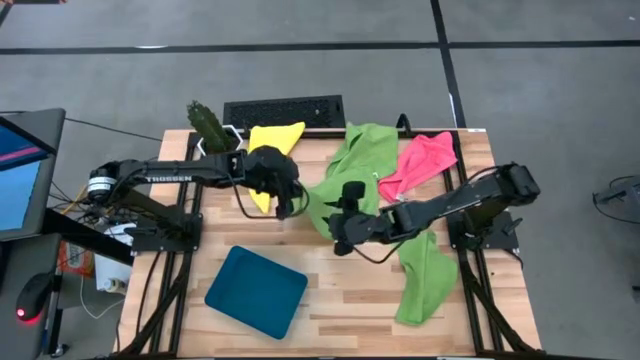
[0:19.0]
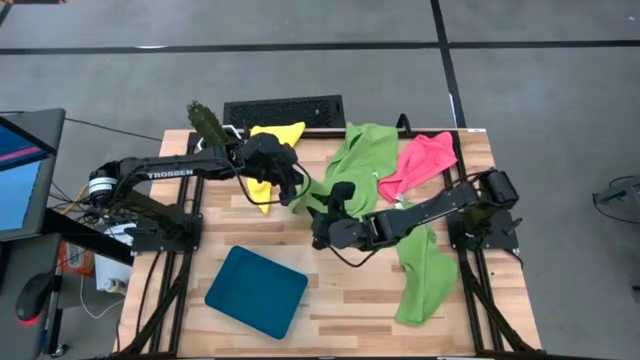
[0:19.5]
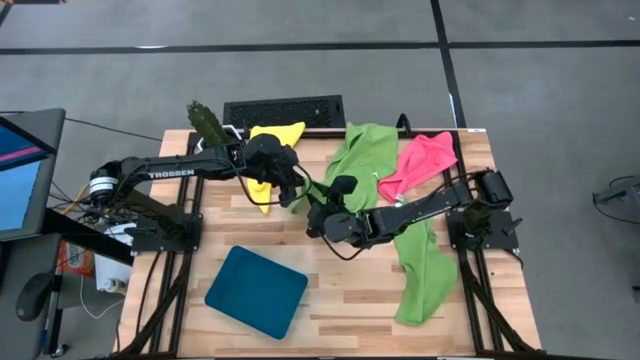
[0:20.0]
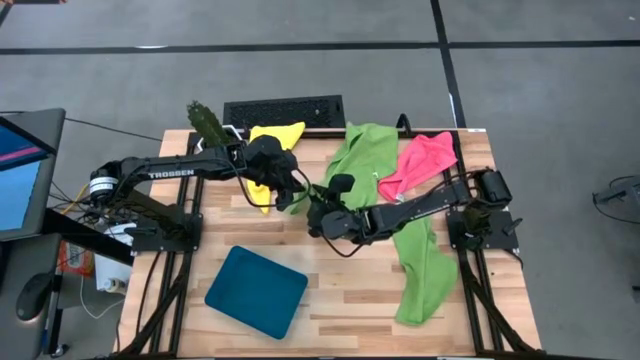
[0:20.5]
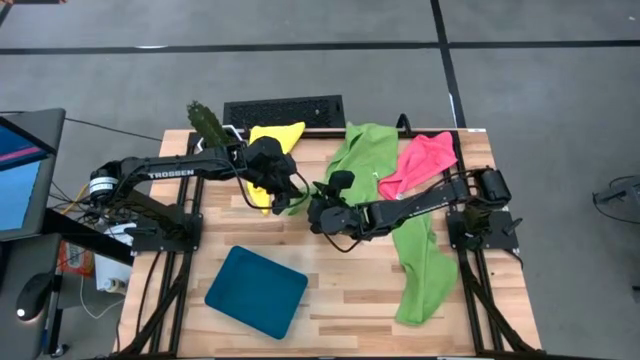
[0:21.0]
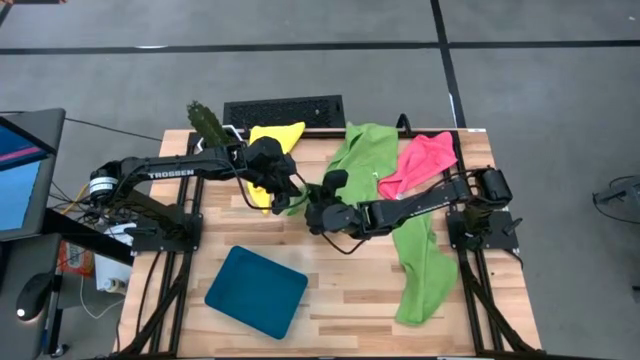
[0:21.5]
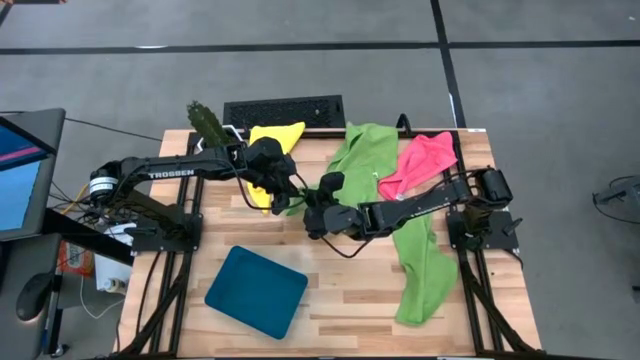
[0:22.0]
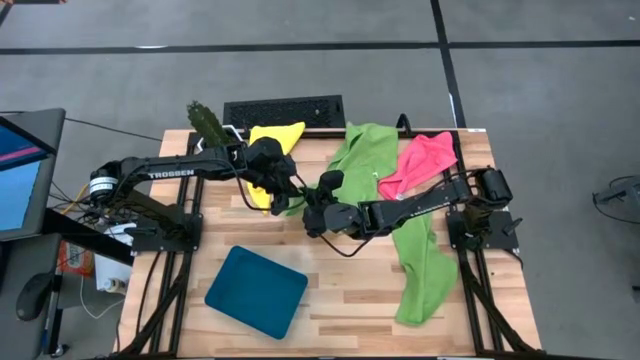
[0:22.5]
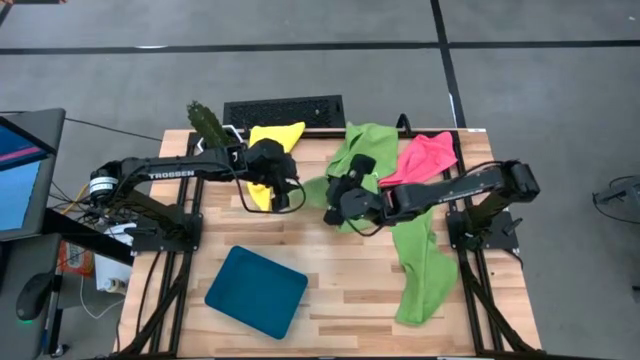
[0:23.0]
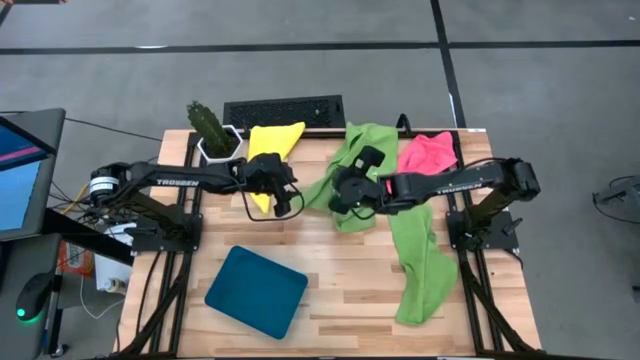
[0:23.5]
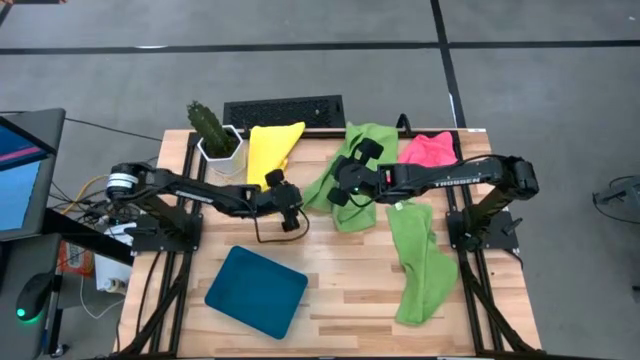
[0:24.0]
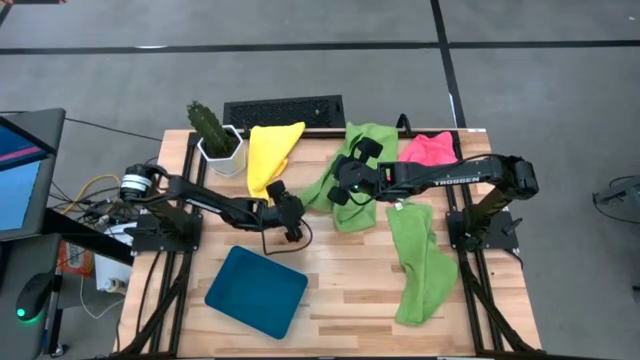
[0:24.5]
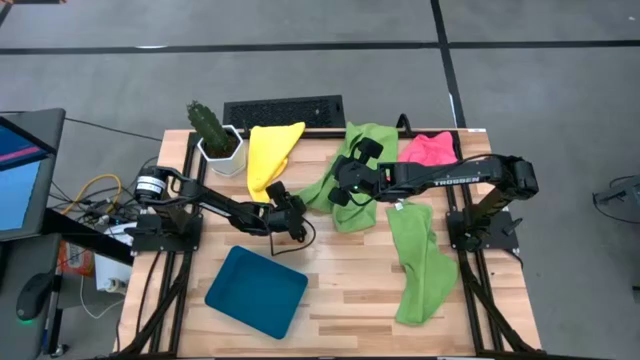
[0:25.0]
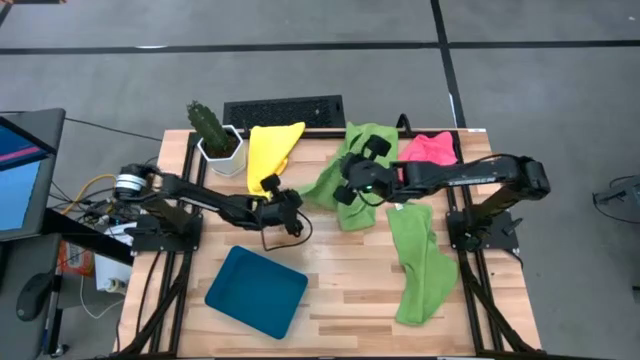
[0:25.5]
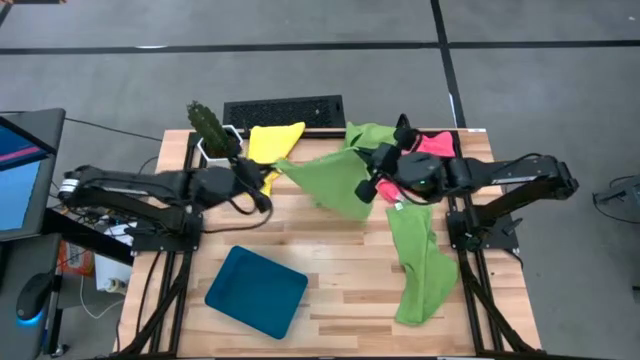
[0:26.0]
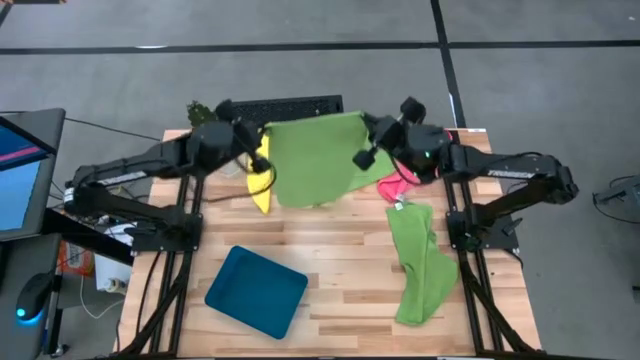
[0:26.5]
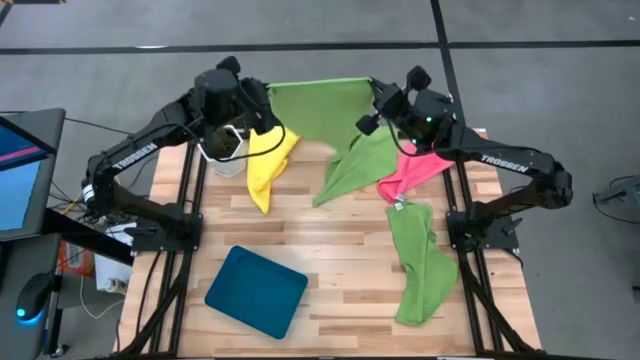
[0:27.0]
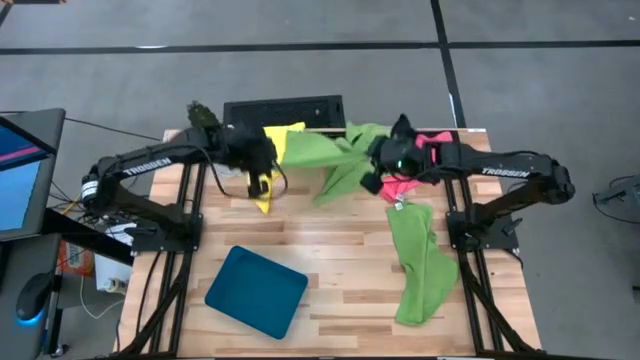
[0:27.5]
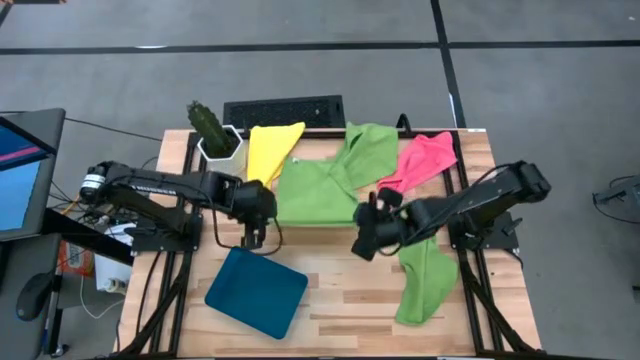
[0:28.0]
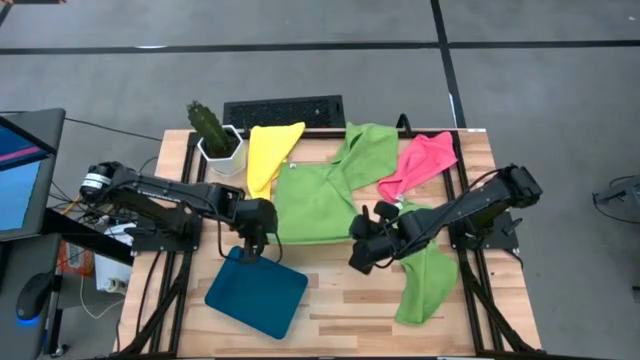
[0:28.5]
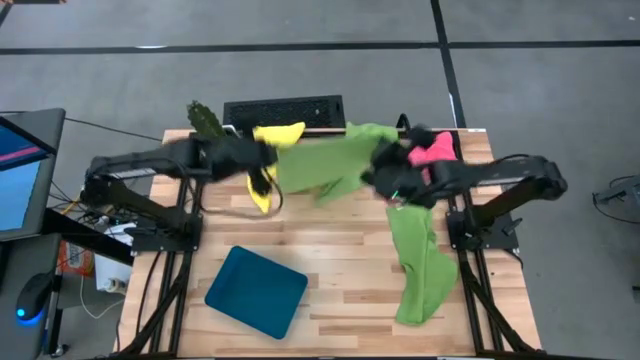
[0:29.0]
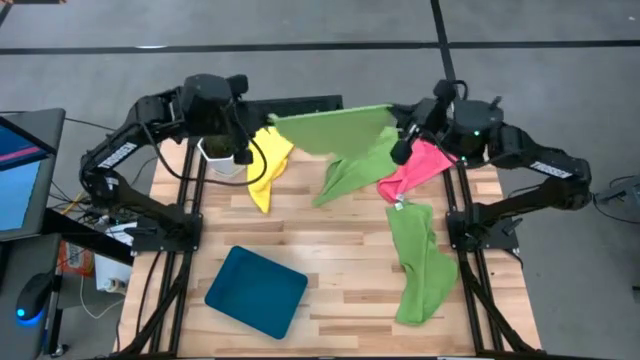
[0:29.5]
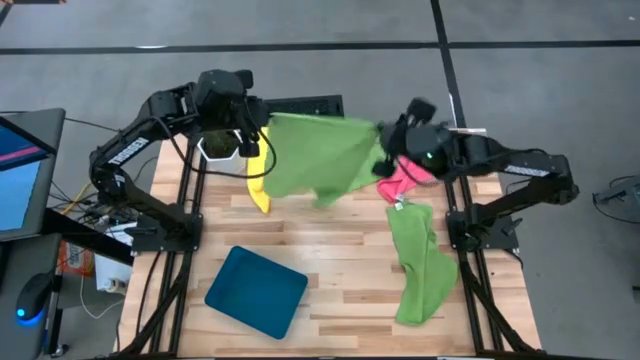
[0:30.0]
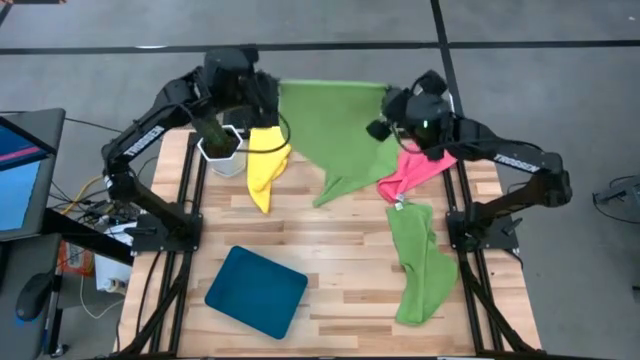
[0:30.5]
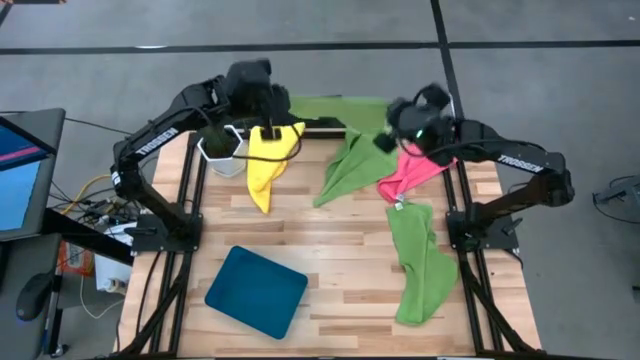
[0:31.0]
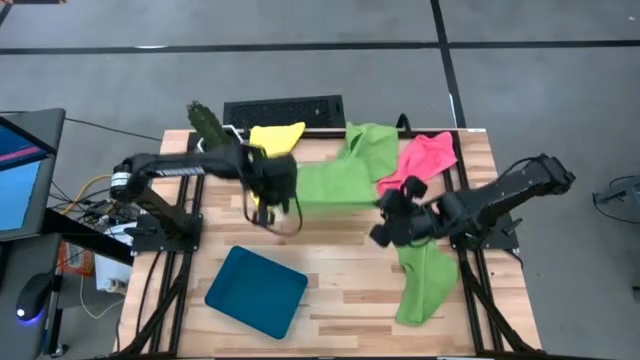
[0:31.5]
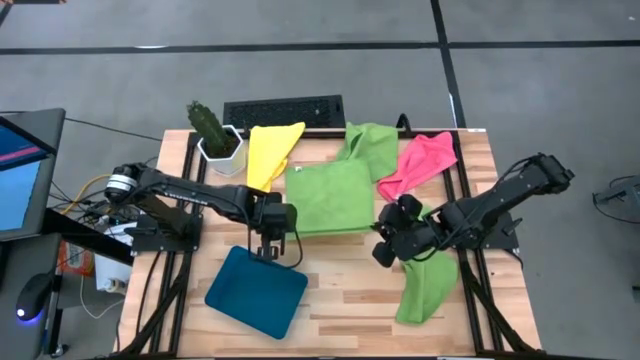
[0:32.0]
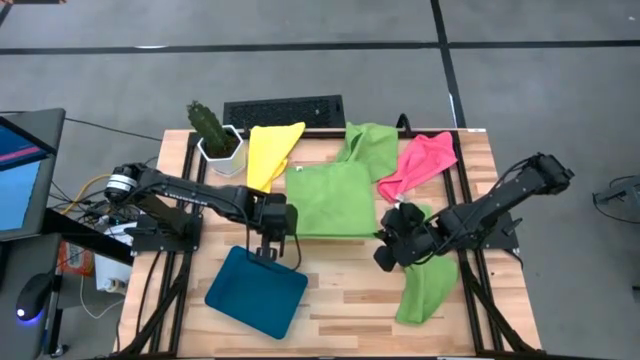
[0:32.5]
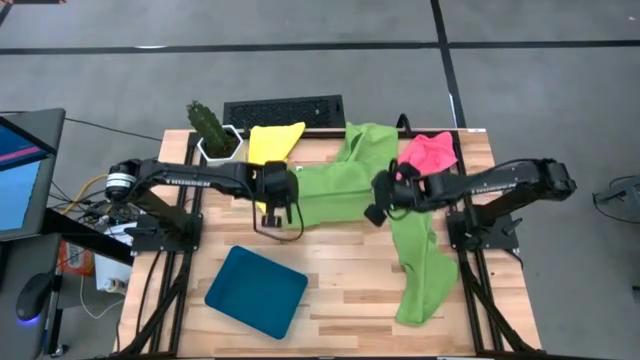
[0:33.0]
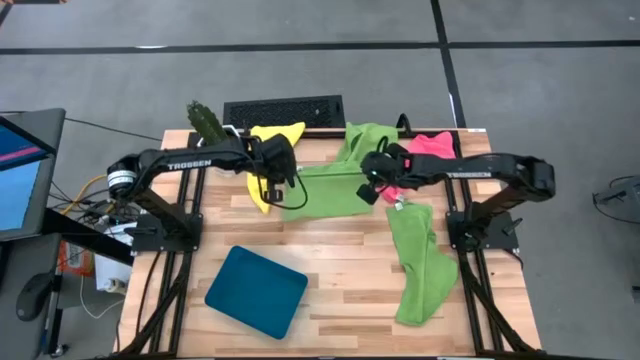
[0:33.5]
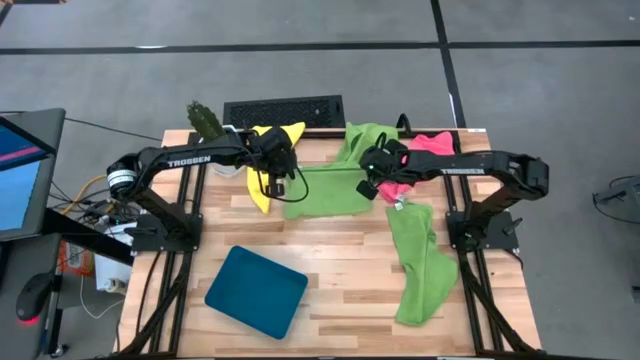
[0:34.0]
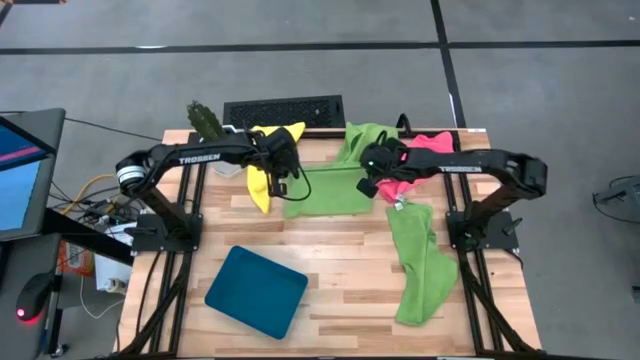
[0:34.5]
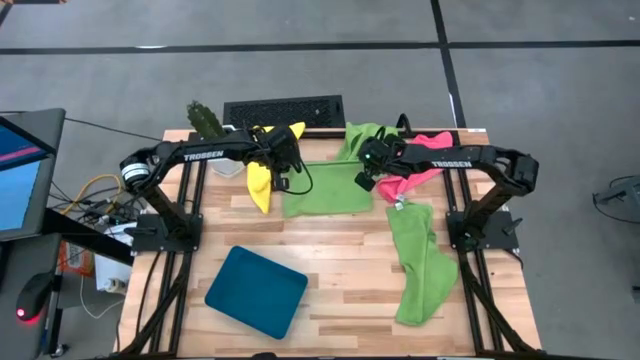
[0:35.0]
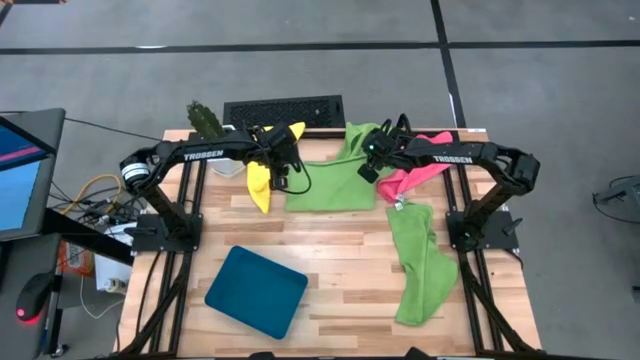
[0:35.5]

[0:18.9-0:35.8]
Task: Fold microfiber towels
Fold the top left green microfiber

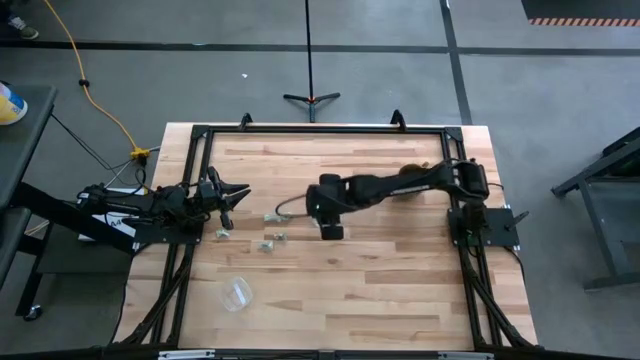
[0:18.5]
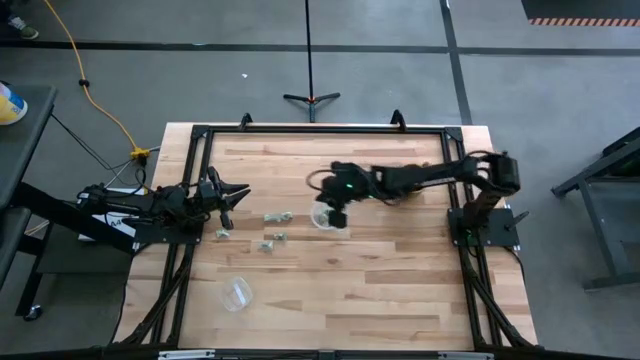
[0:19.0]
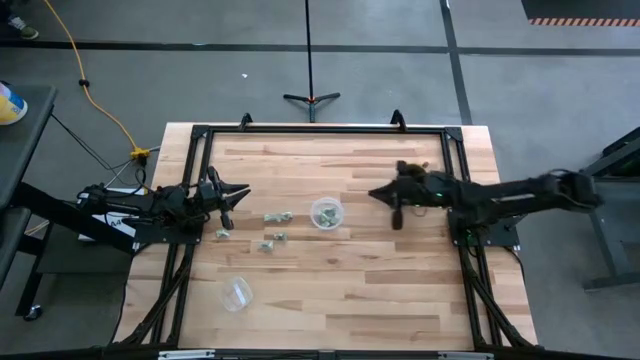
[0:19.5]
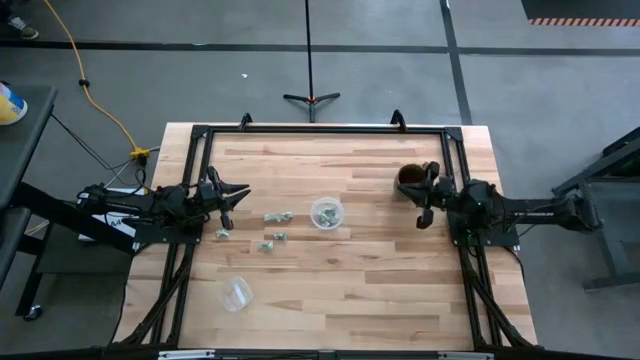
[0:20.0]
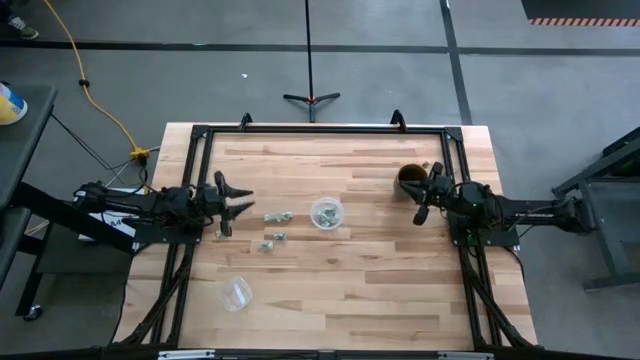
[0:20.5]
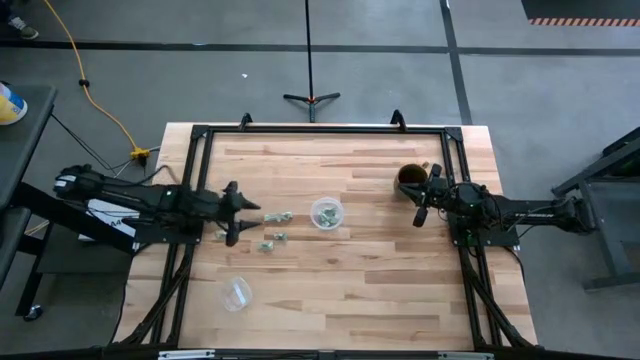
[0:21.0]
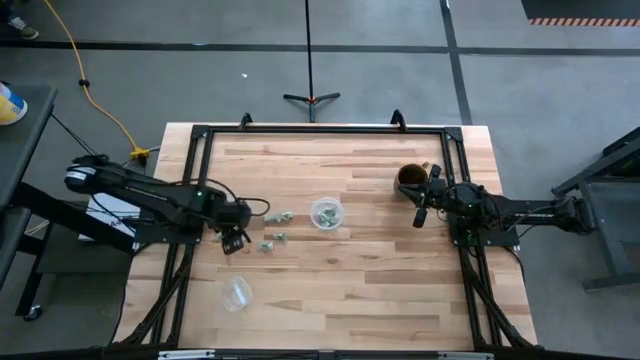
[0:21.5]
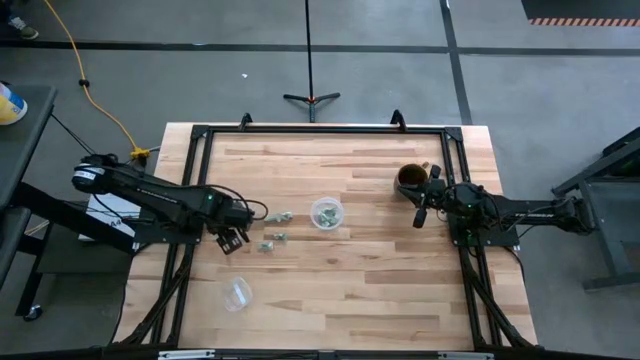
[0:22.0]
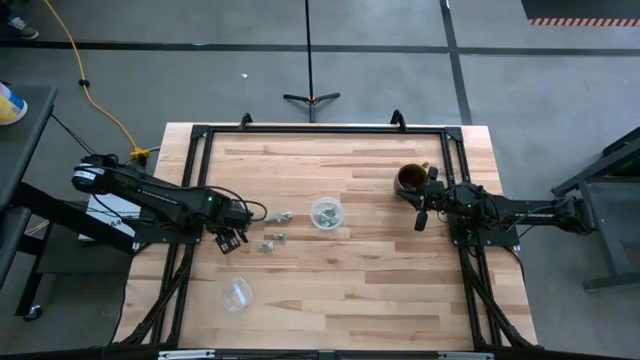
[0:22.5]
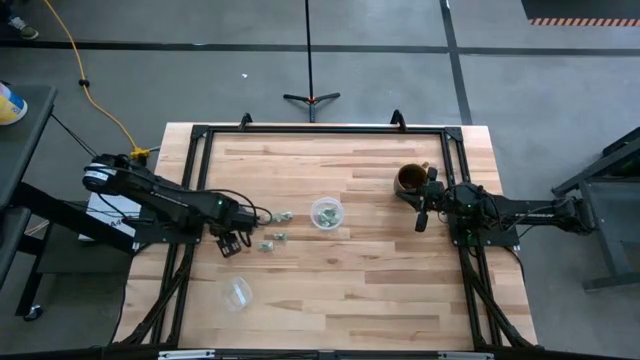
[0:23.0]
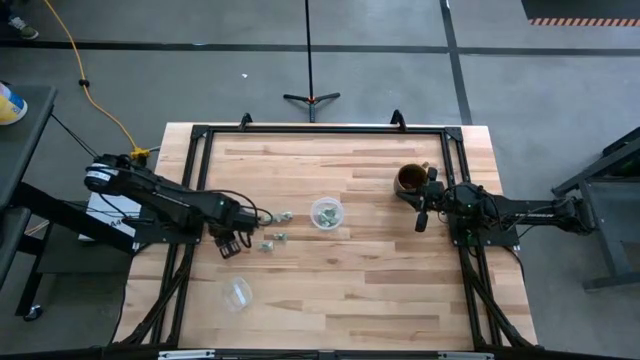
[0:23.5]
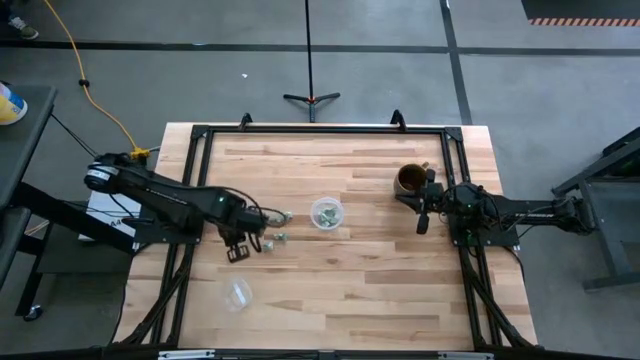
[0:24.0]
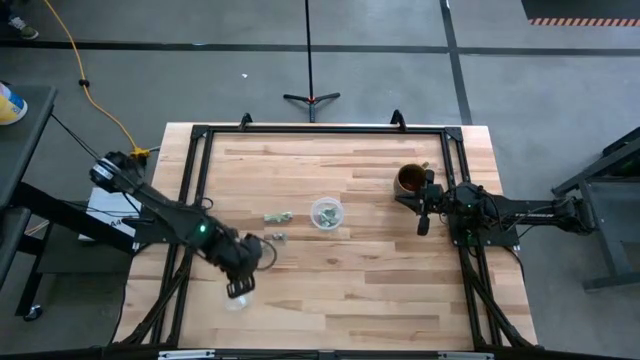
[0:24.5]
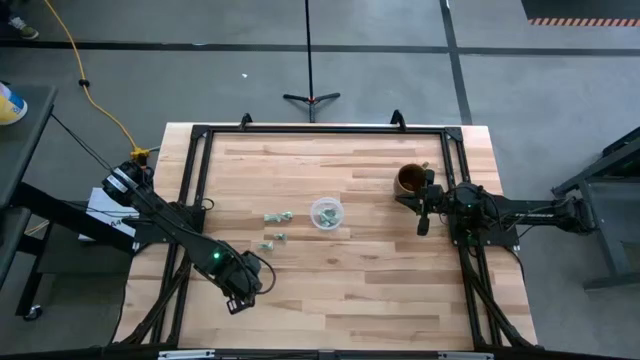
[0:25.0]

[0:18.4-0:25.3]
Task: Pick and place items into bin
Put the green stevia packet into the bottom transparent bin
